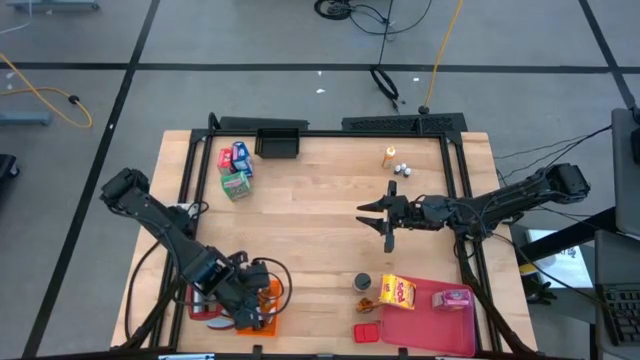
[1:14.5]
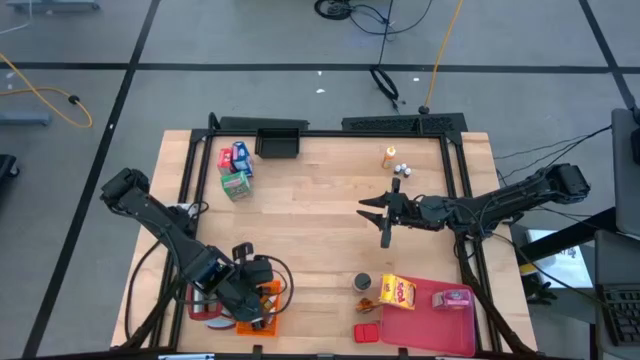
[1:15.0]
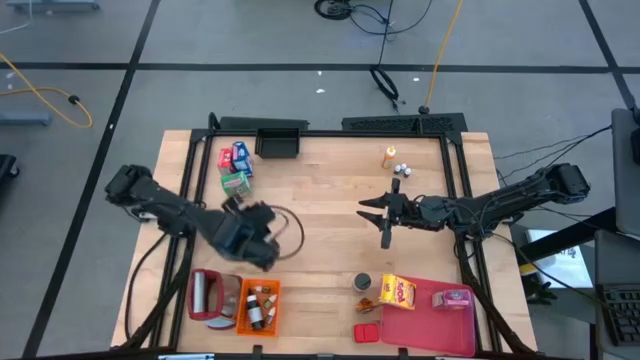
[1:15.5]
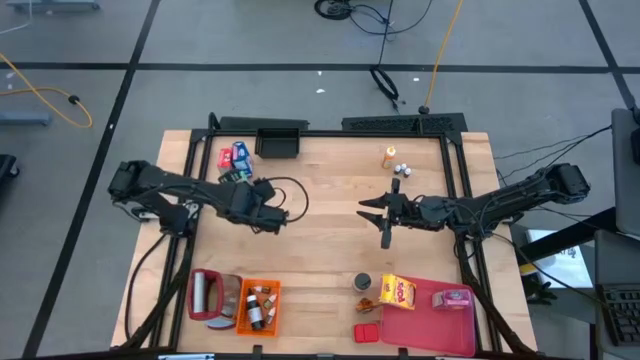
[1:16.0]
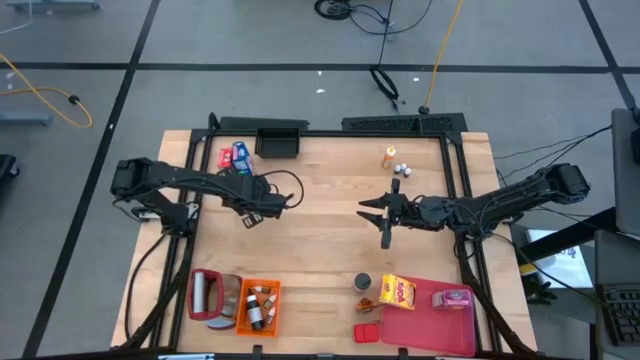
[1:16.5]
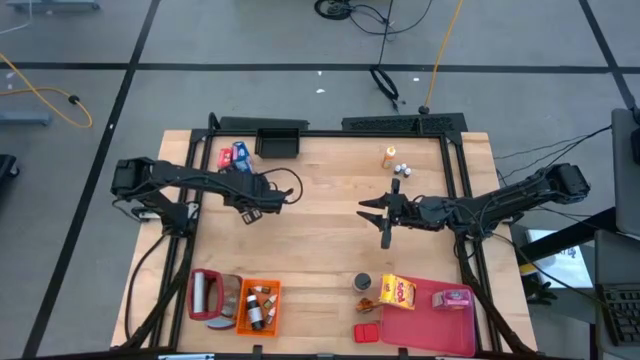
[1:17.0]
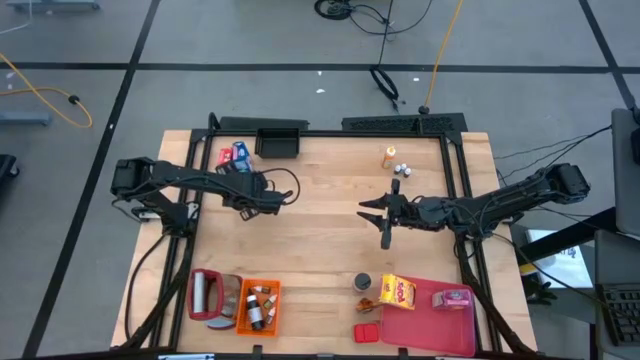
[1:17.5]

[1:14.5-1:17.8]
Task: Pick & Place Kitchen Items
Put the green cereal box into the red bin

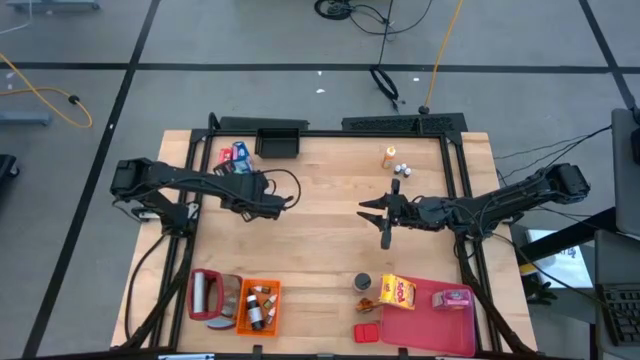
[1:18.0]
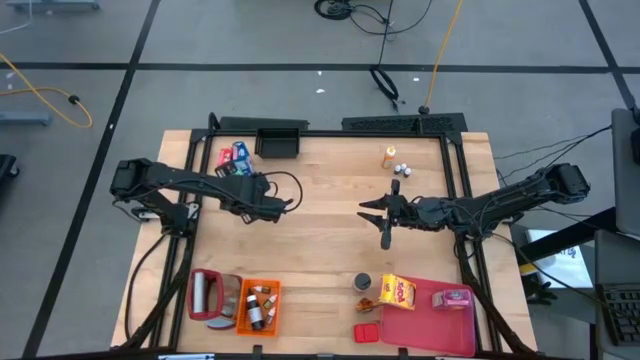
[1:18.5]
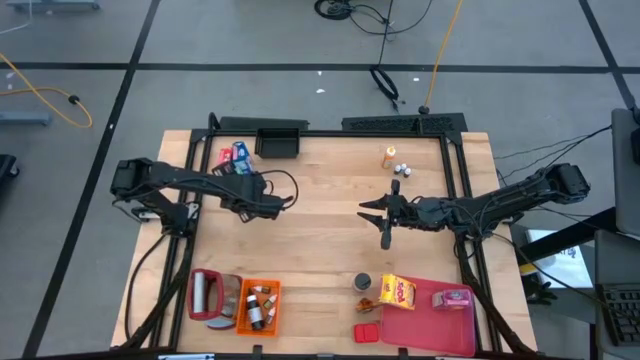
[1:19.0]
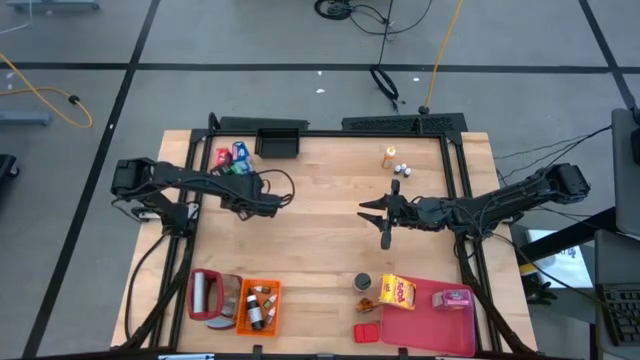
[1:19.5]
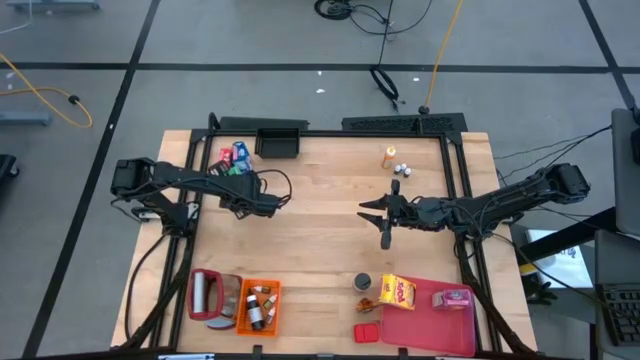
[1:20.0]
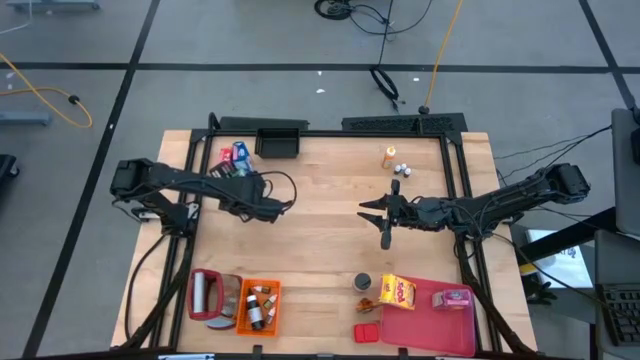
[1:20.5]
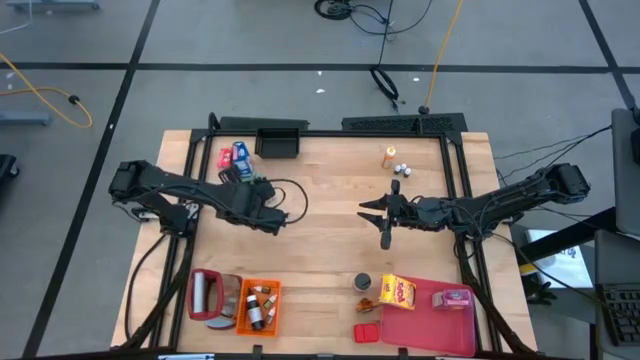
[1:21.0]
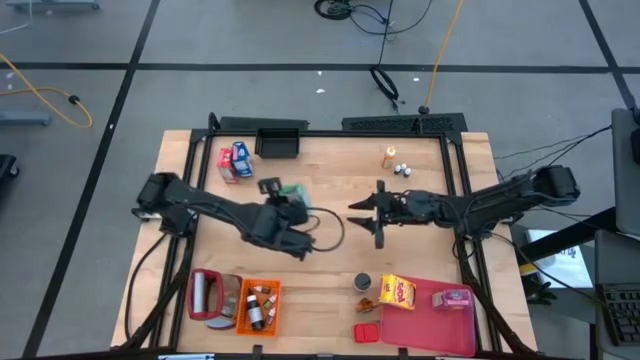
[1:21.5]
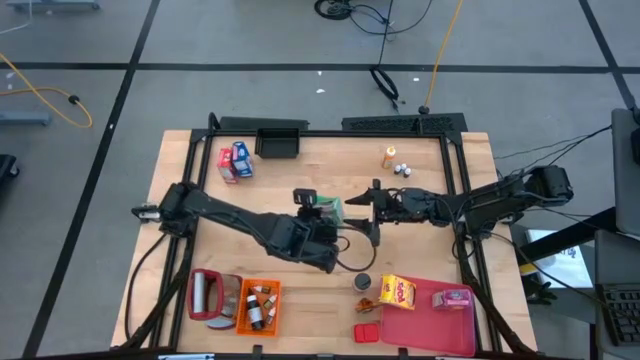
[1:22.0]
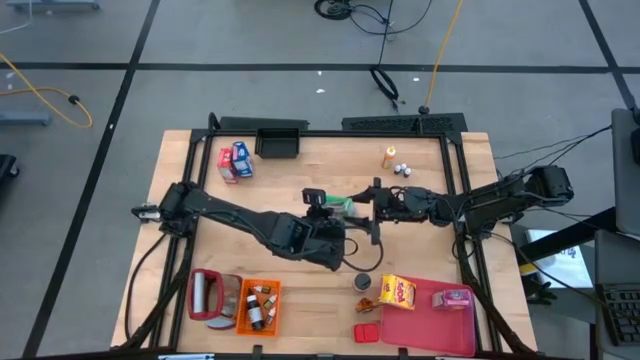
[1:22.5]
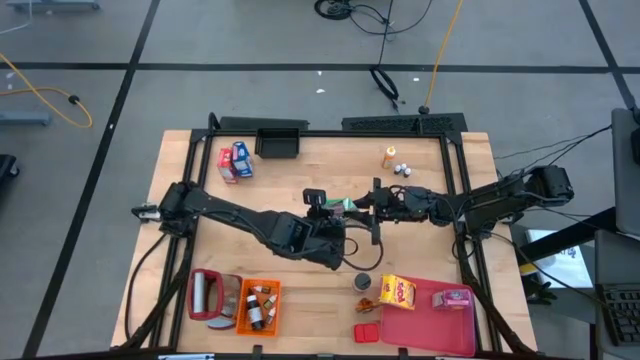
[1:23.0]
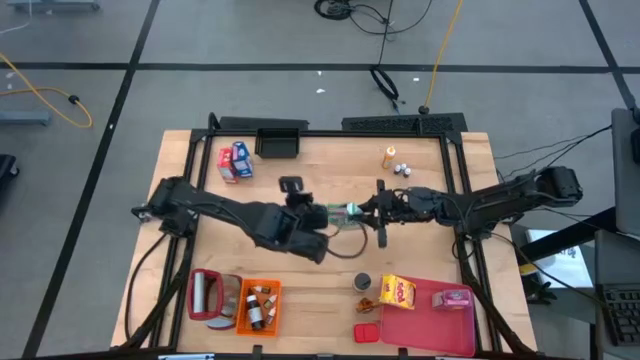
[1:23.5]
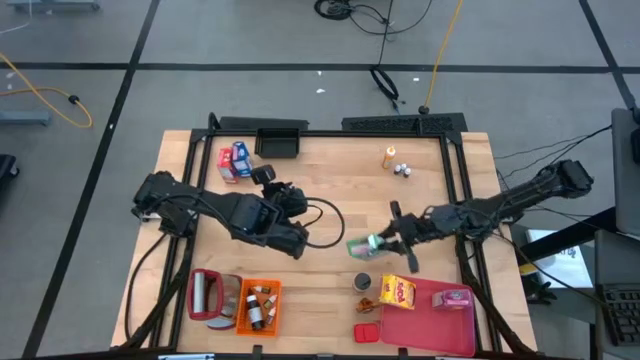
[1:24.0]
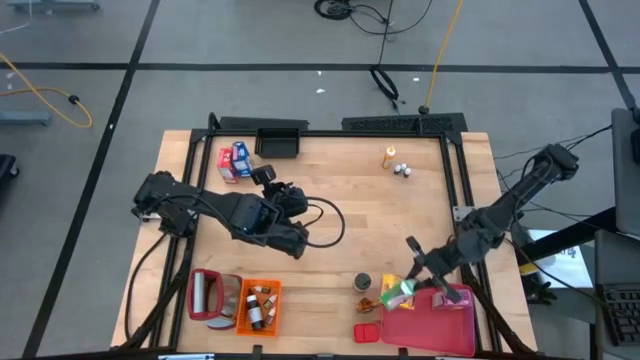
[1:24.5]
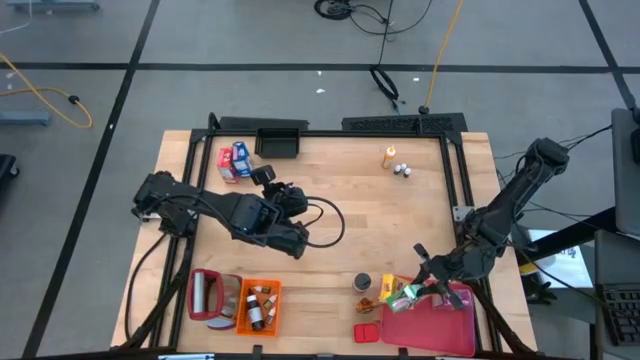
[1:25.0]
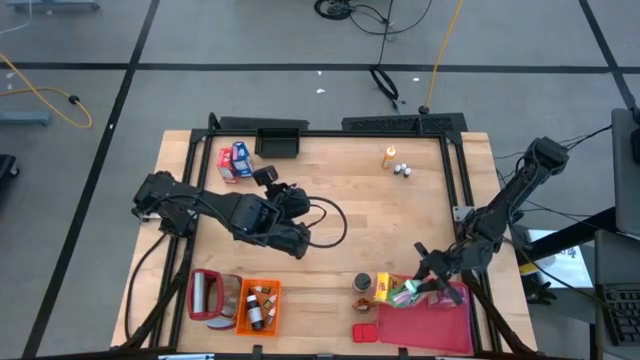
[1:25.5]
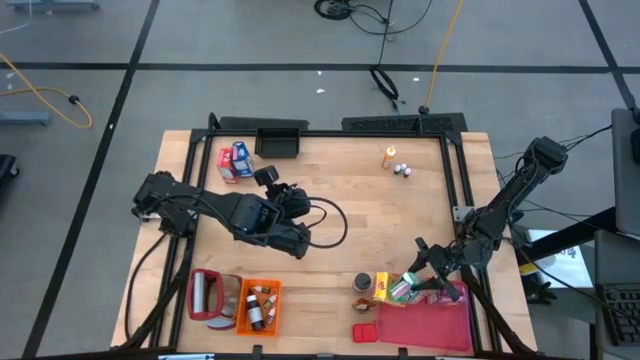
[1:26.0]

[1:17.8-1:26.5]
Put the green cereal box into the red bin

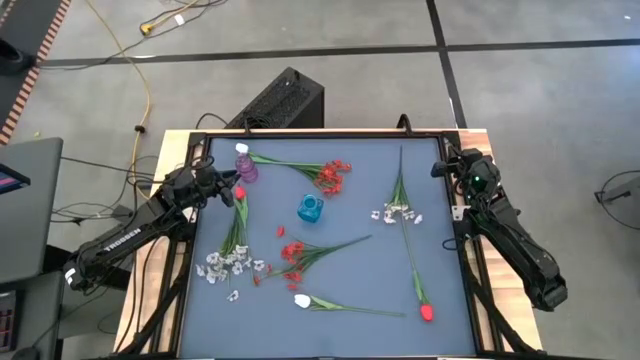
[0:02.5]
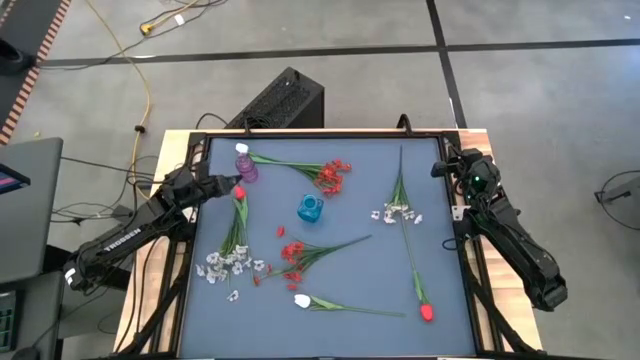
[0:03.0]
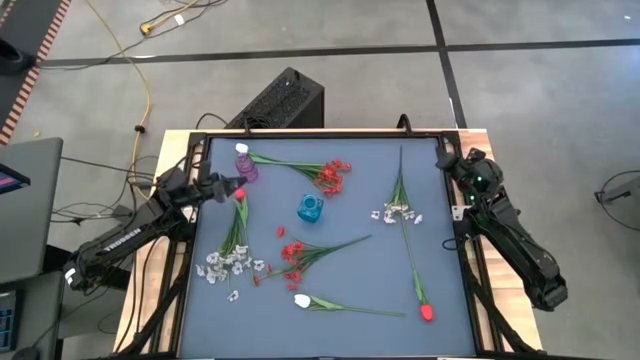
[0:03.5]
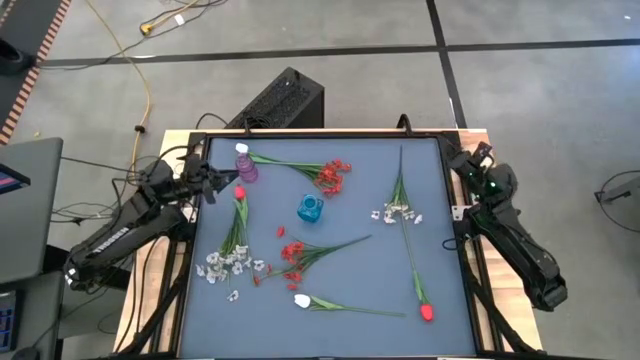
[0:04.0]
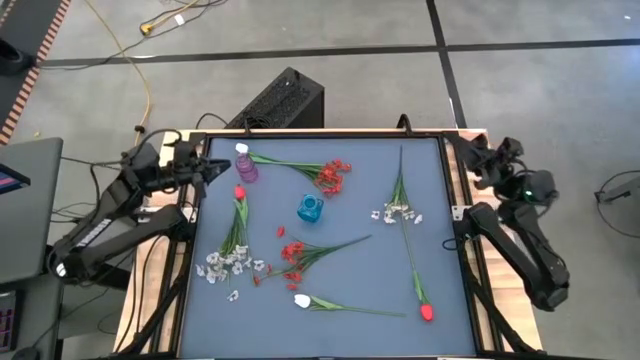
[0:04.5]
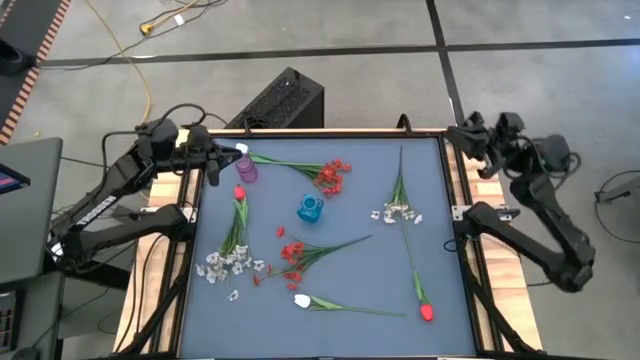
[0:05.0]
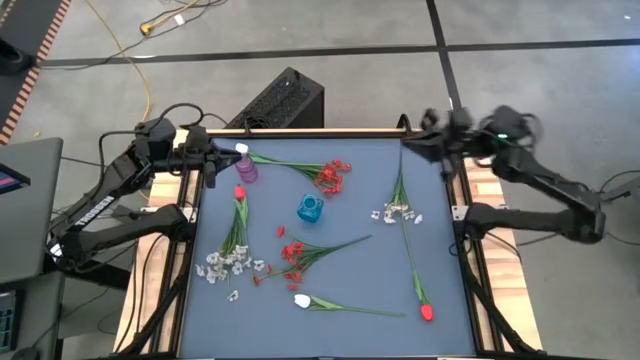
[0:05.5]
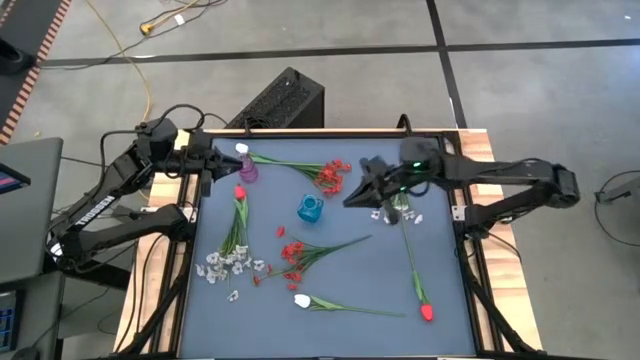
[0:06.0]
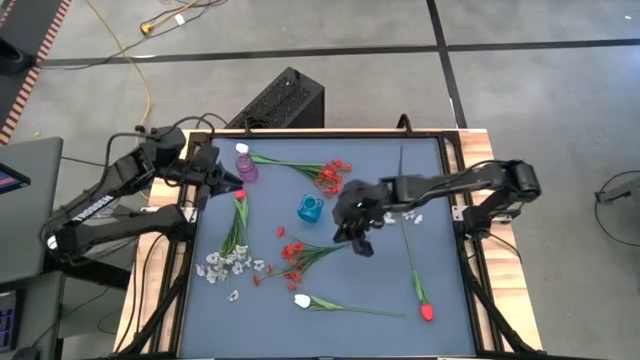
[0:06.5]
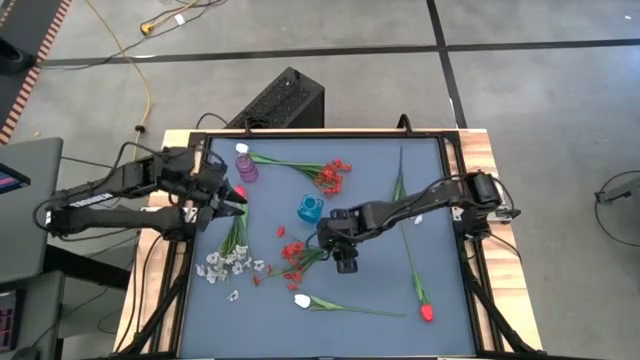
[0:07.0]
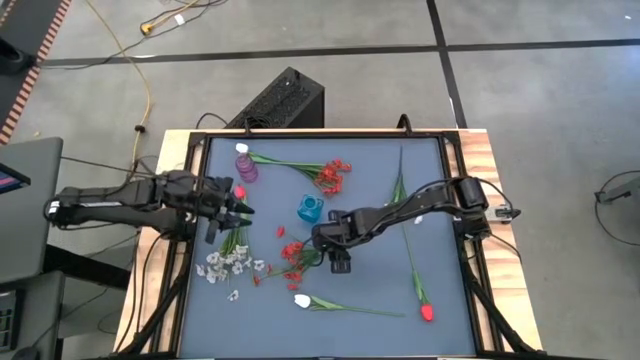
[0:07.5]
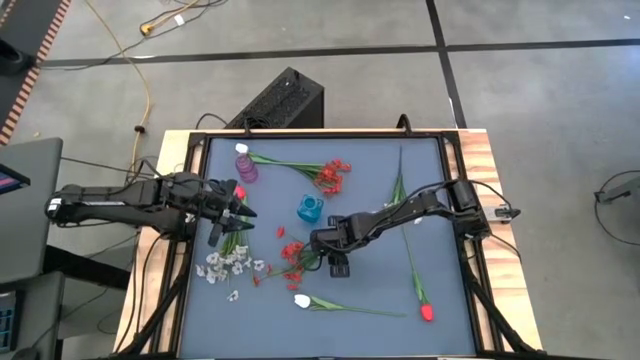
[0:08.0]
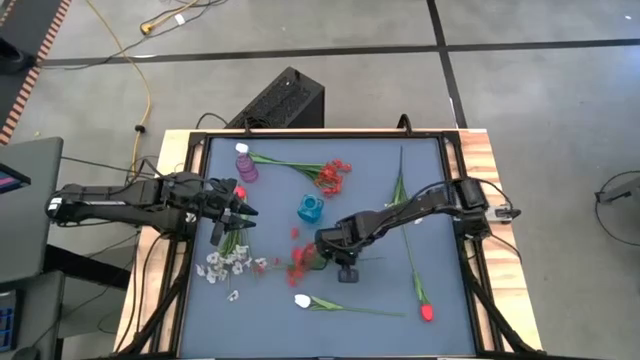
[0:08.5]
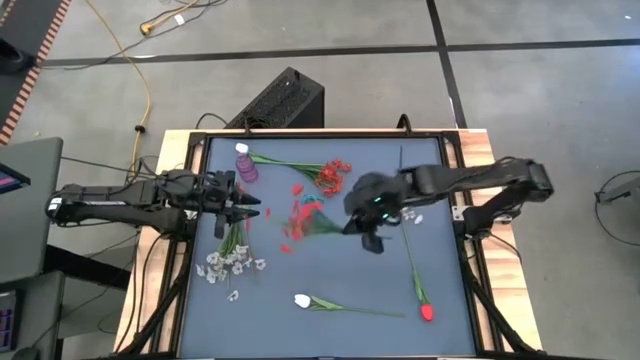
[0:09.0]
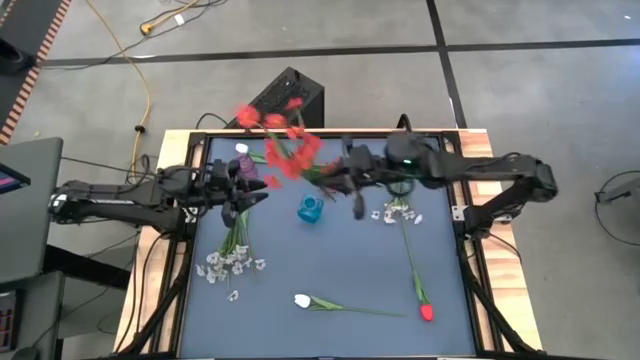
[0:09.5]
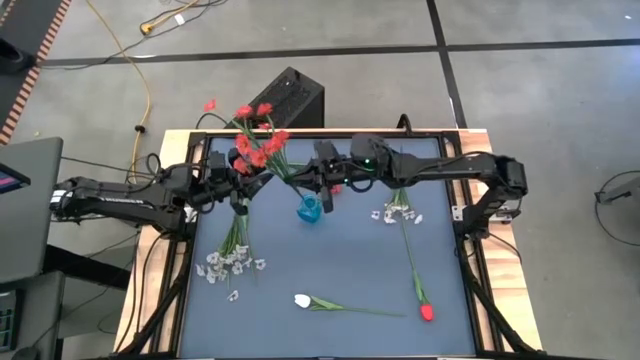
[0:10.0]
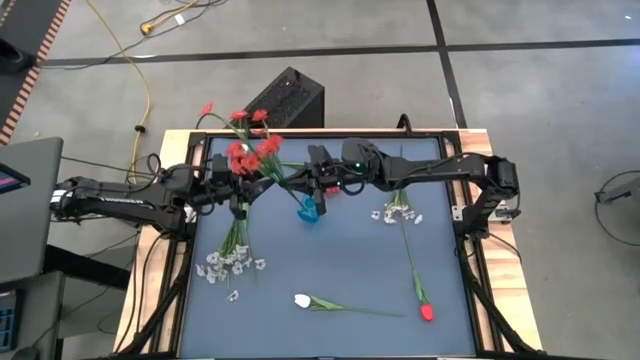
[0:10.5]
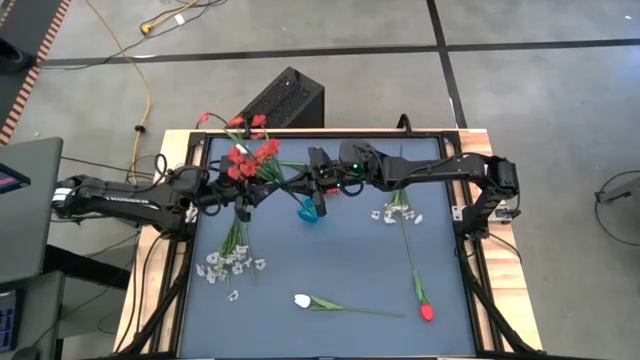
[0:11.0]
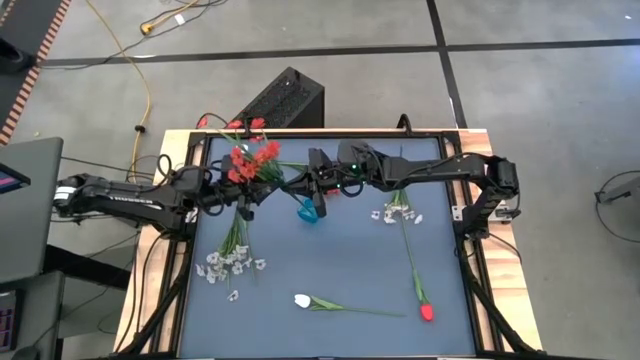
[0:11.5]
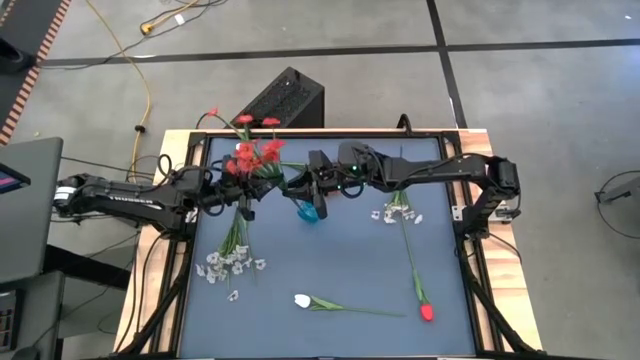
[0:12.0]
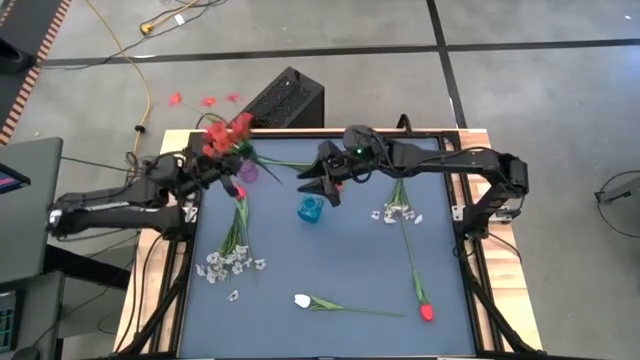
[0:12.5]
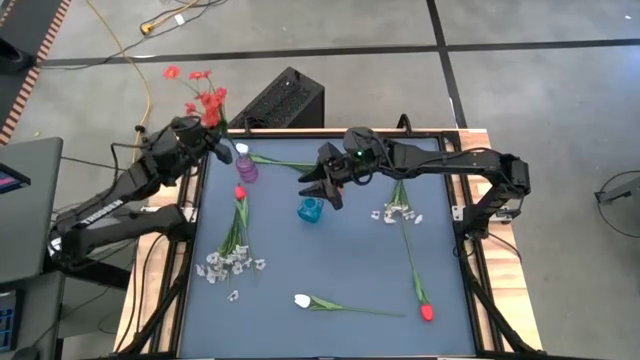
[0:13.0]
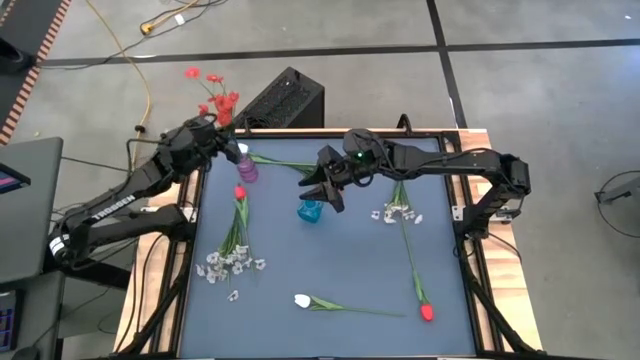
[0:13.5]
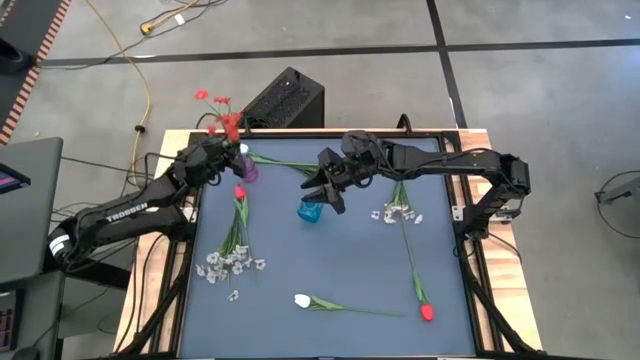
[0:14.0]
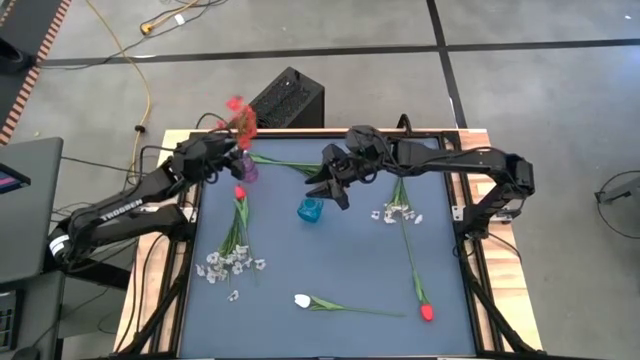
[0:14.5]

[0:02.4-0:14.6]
Task: Sort flowers into vase by color
Put the bottom red flowers into the purple vase
